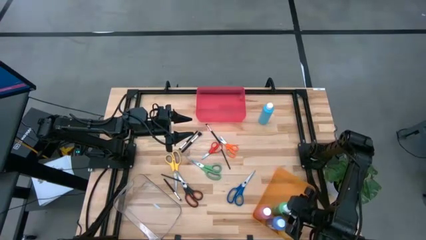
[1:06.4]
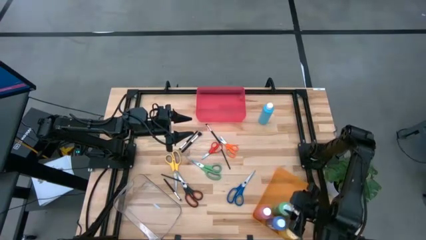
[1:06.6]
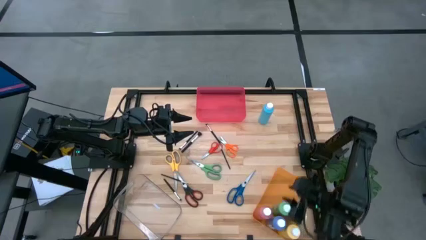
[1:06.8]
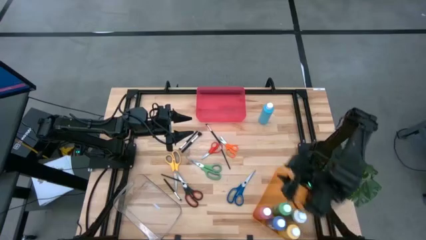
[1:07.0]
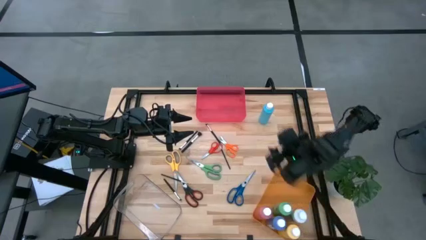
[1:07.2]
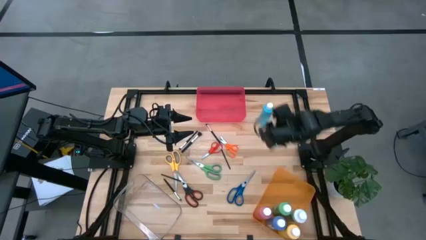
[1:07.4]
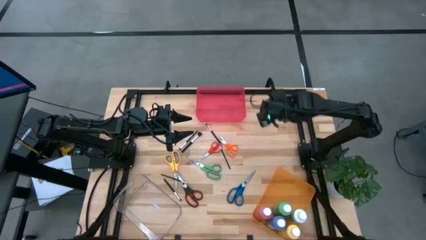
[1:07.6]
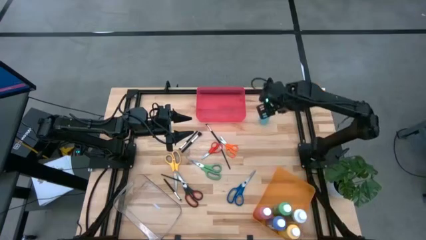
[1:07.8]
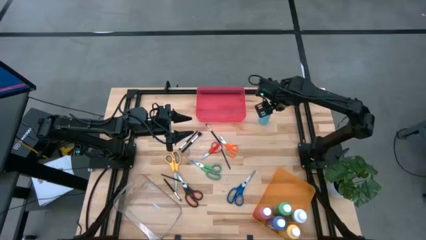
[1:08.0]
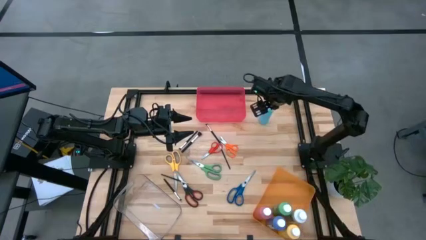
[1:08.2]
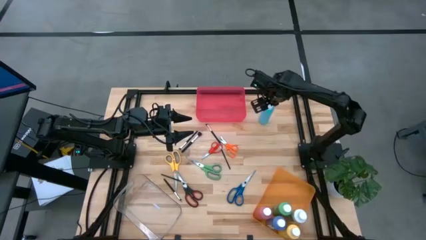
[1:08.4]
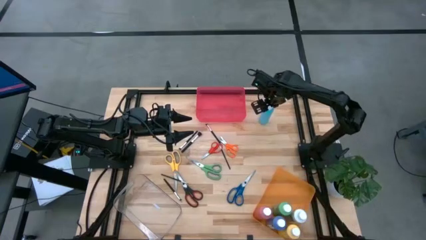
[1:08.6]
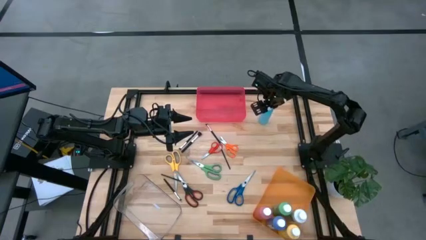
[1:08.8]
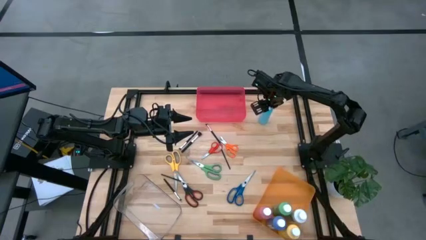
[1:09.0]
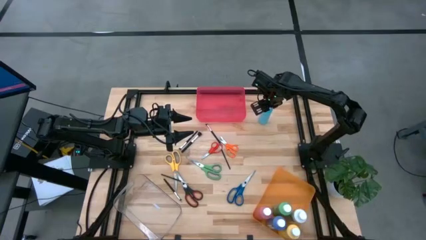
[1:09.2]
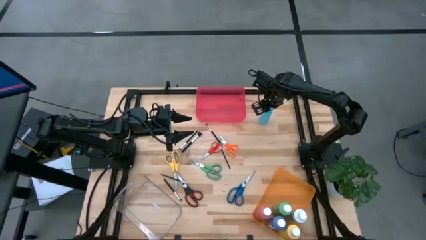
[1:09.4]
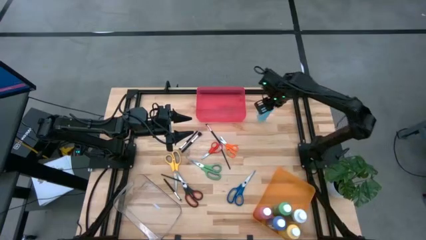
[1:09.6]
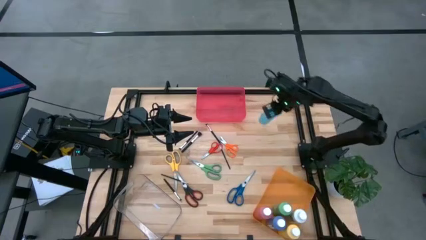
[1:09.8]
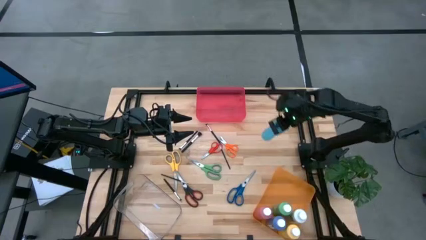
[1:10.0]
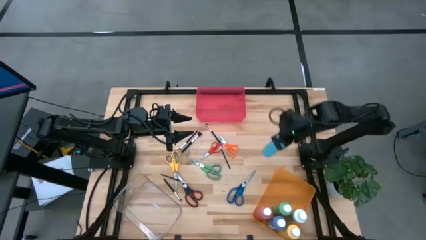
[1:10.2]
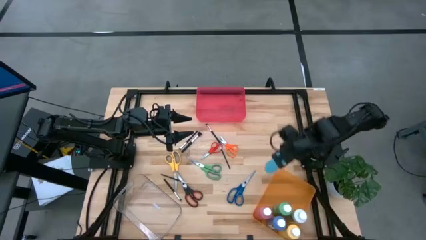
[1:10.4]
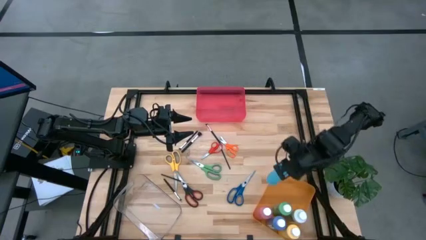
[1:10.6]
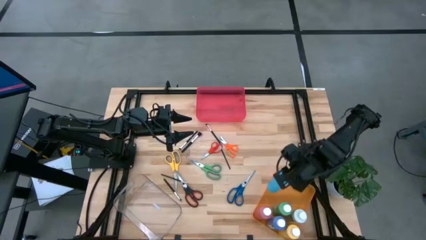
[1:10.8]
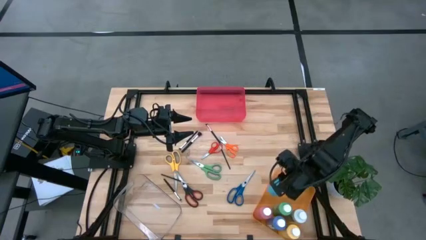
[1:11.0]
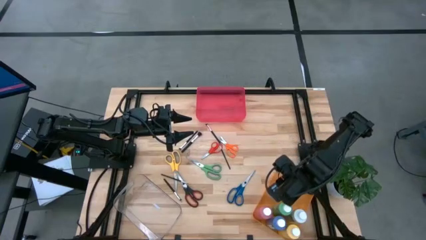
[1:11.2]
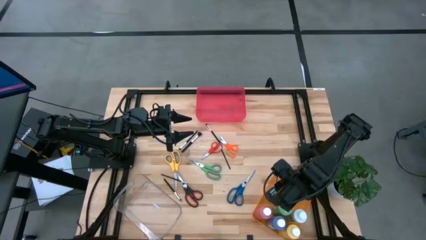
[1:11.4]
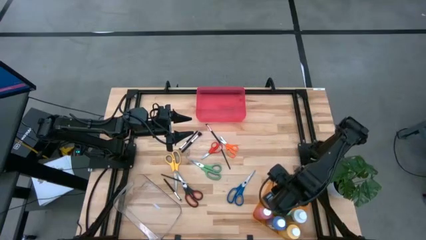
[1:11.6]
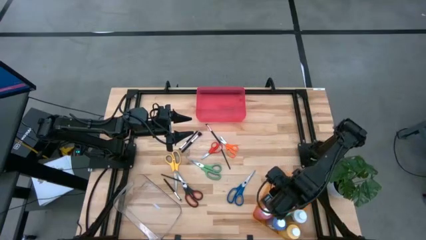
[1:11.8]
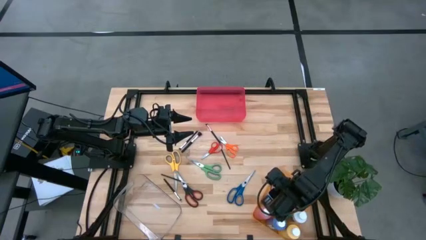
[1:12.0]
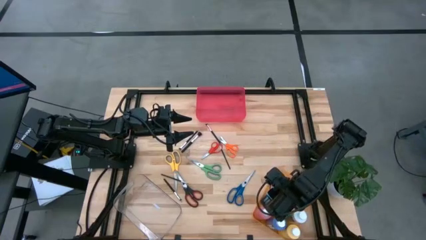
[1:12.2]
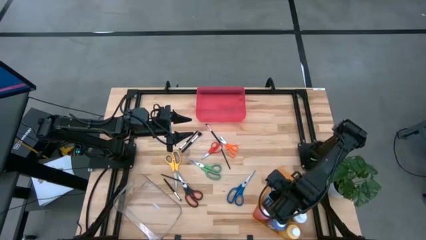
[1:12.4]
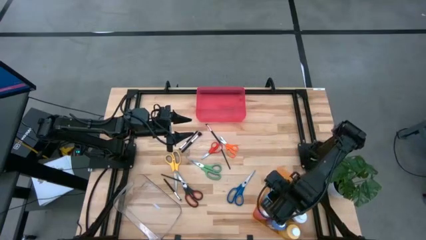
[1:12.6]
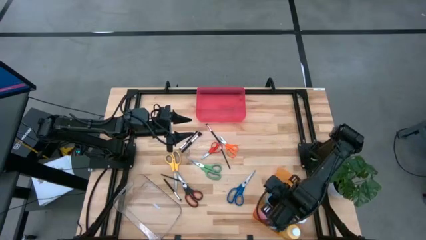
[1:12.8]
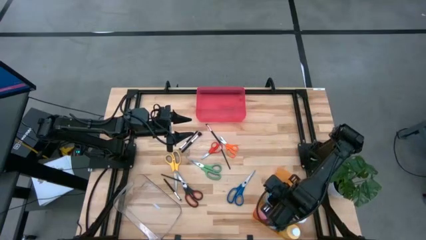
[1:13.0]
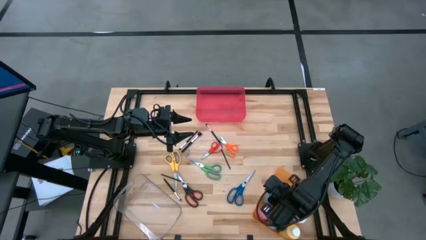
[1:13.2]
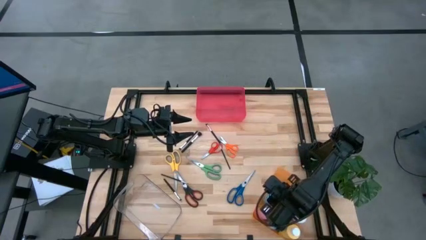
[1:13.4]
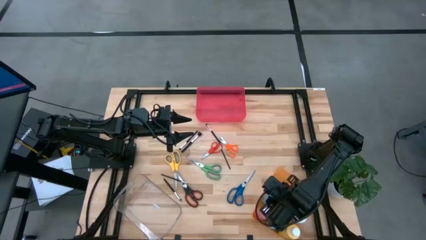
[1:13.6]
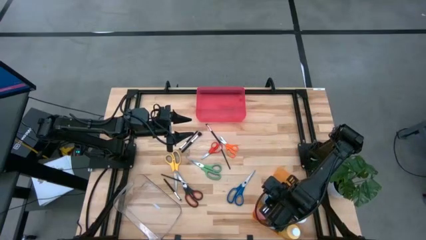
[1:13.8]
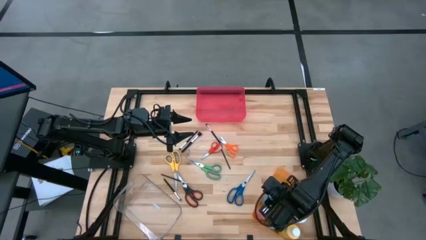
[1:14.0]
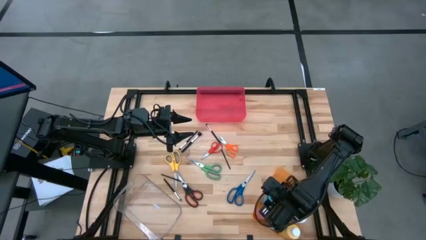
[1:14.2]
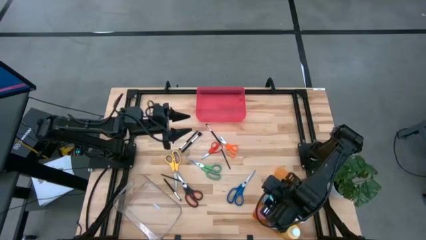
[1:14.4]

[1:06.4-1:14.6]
Task: Pick & Place Paint Supplies
Put the light blue paint bottle into the orange bin

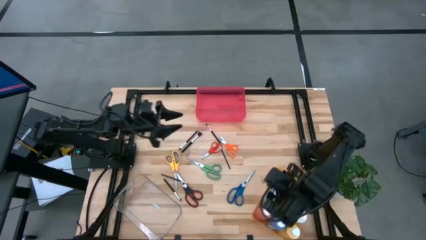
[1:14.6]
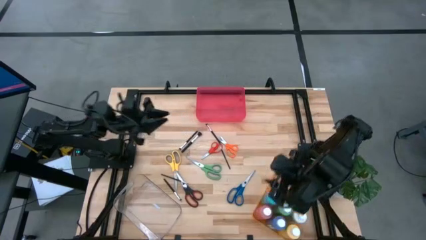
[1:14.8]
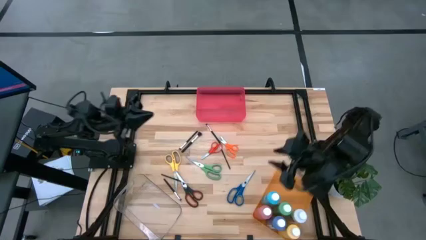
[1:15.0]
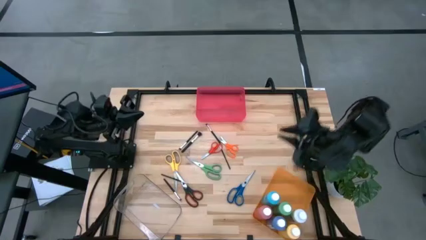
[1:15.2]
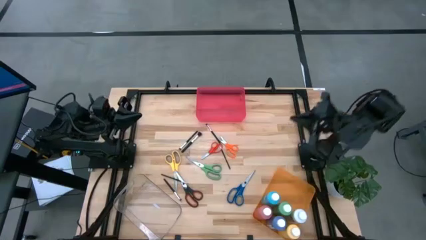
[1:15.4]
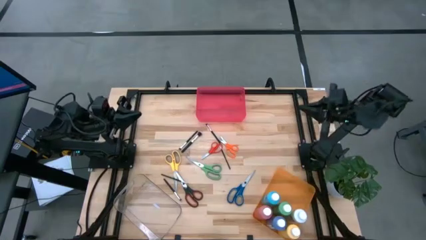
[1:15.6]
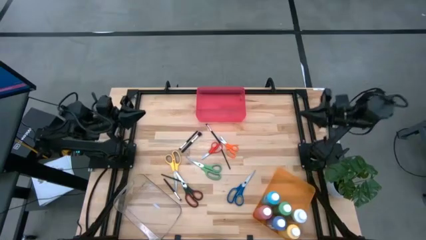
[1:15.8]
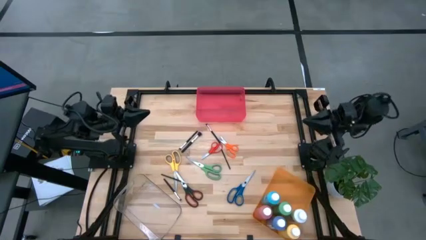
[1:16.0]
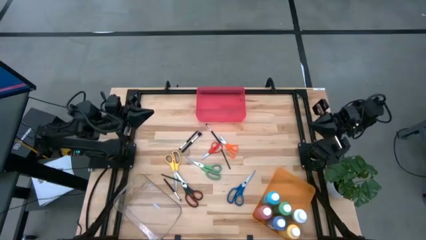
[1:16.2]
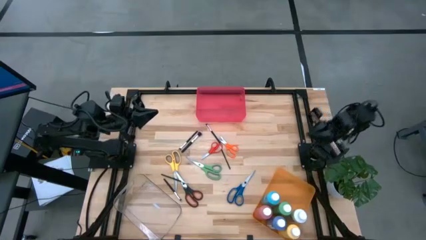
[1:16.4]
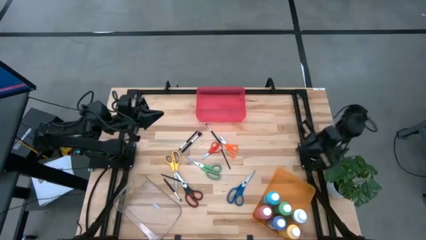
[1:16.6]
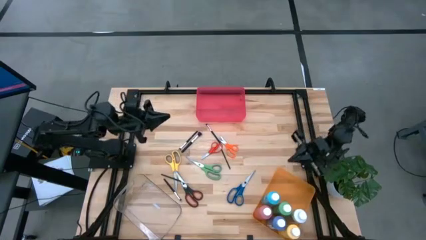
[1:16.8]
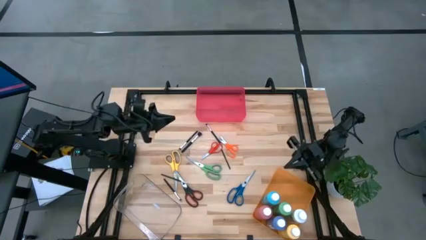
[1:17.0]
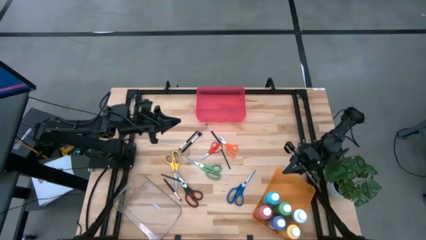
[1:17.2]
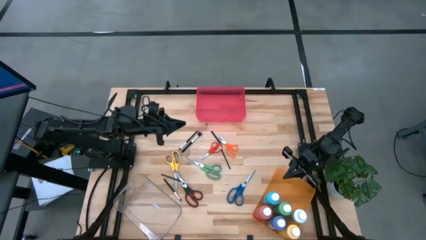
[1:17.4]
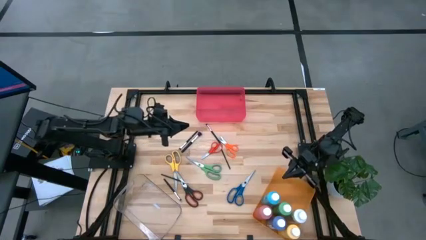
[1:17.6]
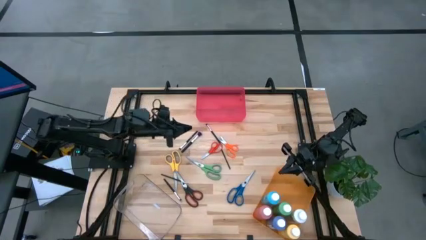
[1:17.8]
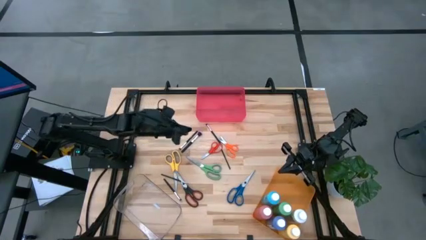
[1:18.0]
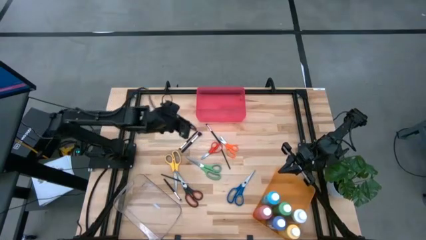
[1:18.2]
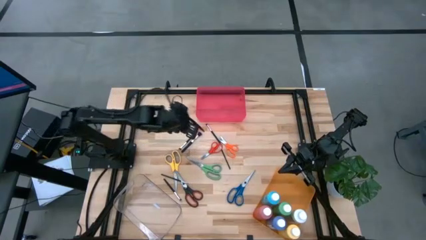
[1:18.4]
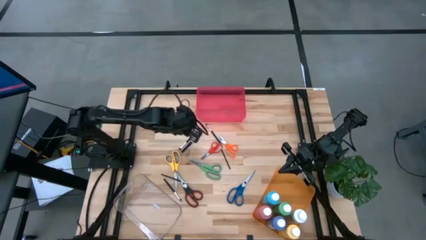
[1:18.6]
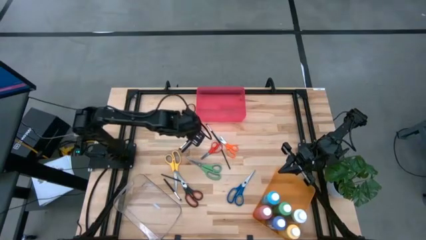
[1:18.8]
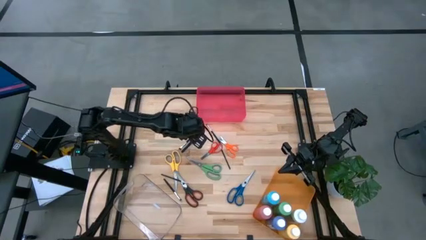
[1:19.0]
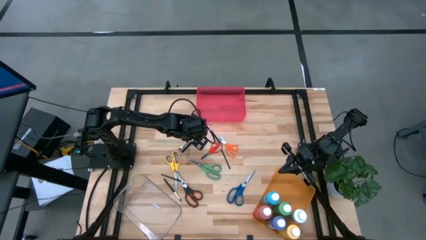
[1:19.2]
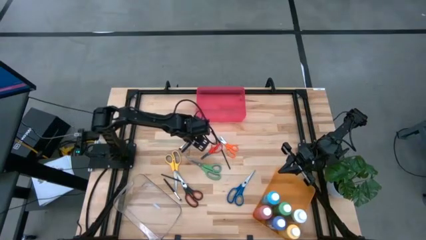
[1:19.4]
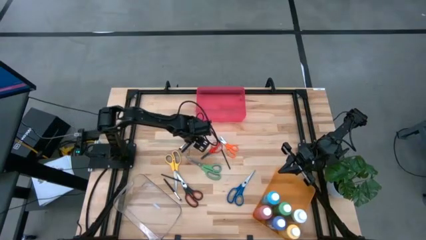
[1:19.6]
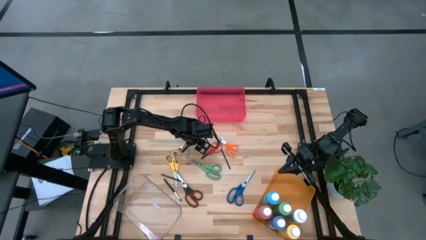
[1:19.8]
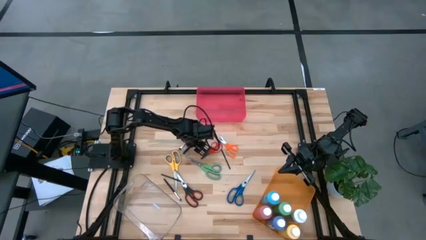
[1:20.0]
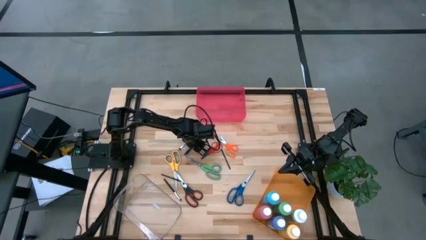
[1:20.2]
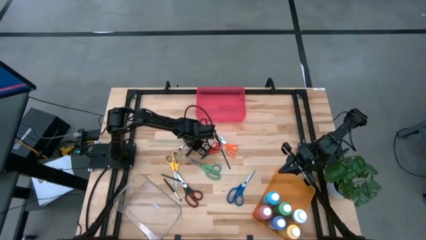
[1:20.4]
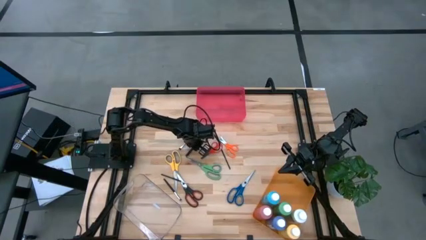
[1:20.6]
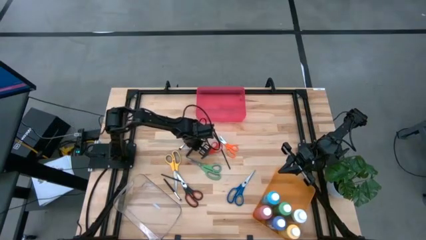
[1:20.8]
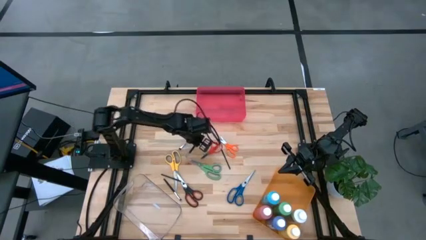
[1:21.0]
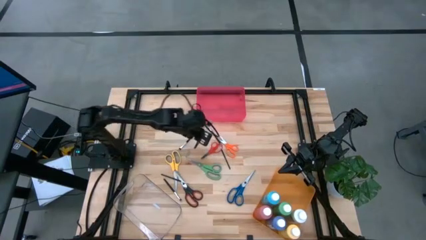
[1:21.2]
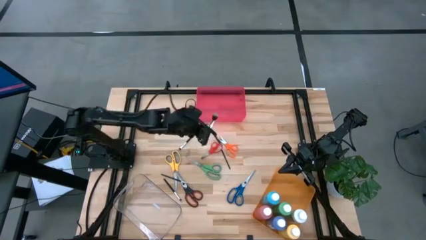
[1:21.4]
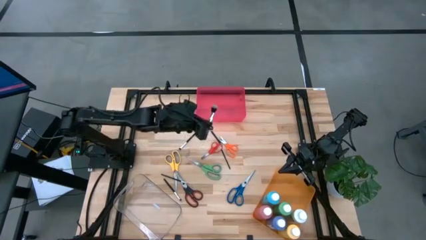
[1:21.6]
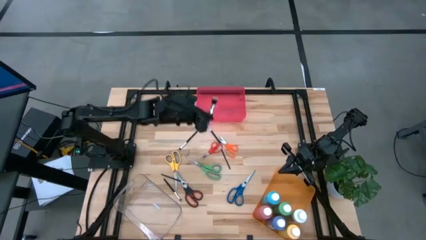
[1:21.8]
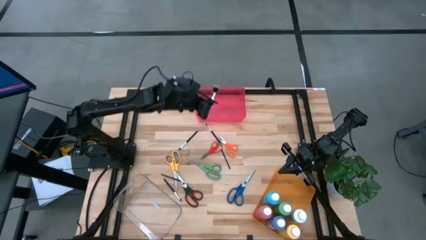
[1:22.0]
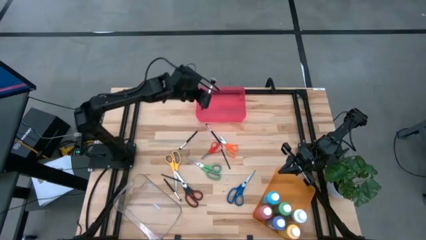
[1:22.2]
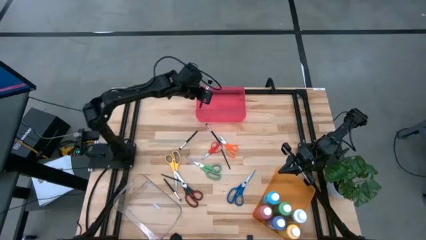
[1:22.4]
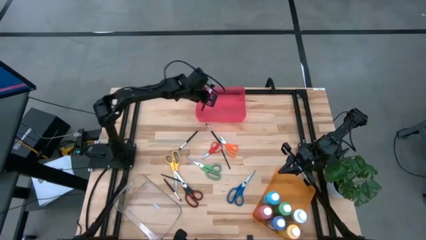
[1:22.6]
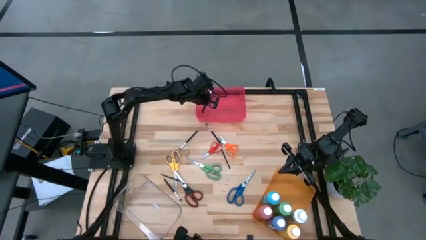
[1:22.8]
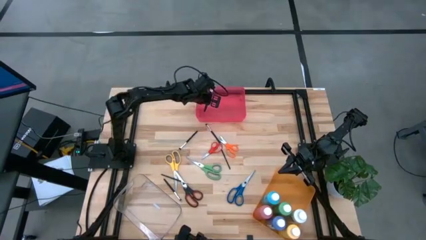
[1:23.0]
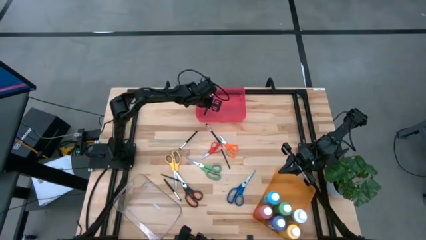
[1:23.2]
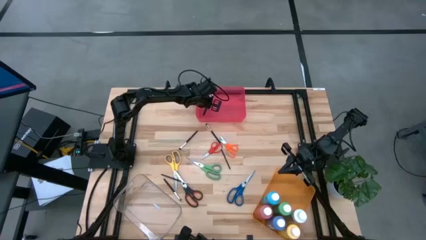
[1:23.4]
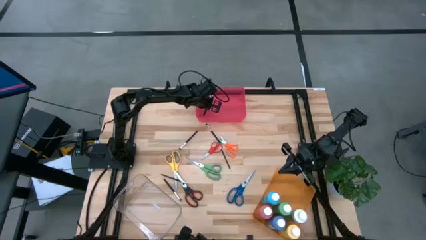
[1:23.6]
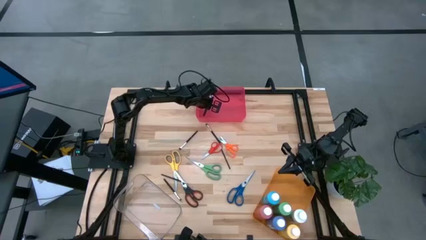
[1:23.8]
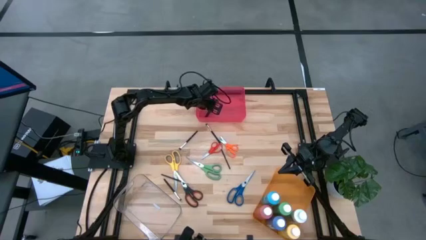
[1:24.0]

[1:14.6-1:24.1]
Put the silver brush into the red bin
